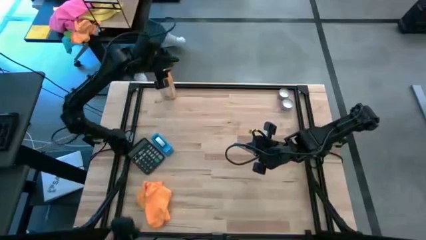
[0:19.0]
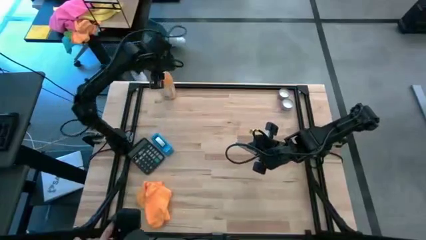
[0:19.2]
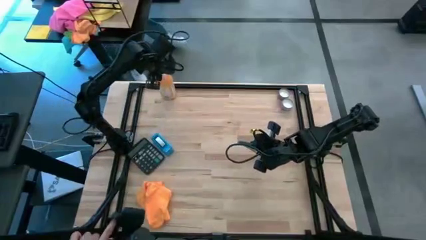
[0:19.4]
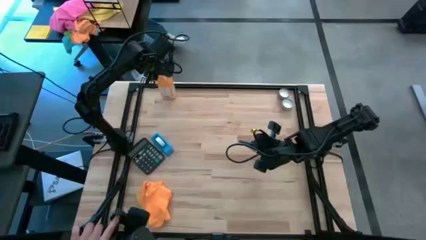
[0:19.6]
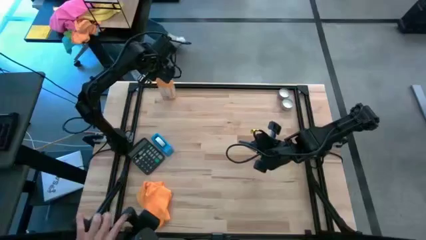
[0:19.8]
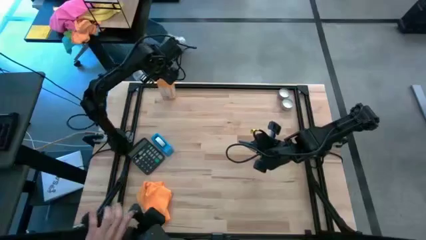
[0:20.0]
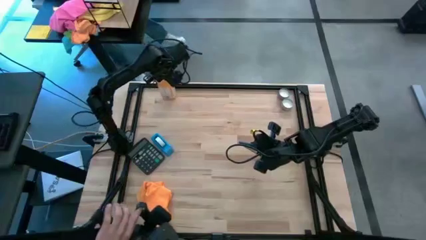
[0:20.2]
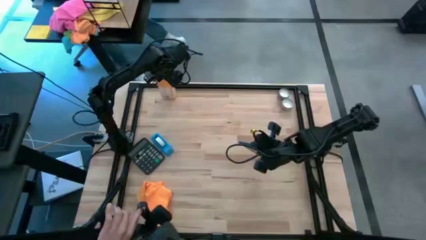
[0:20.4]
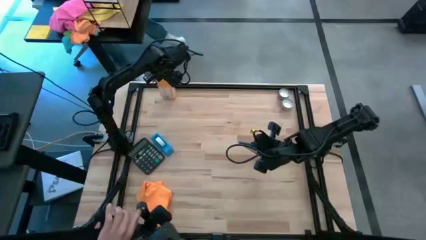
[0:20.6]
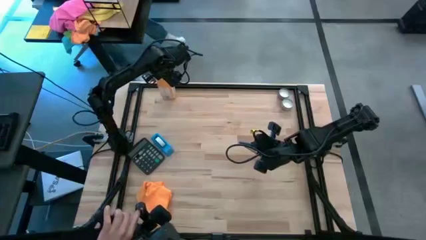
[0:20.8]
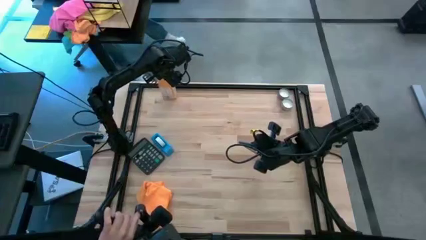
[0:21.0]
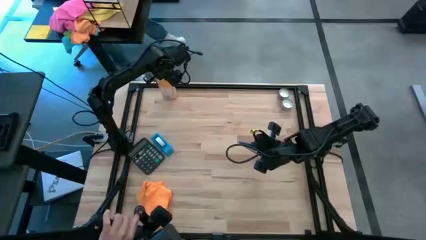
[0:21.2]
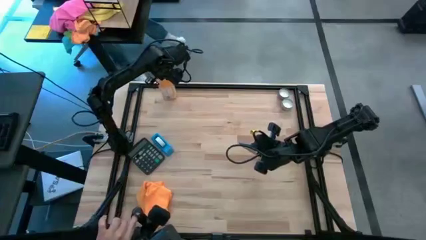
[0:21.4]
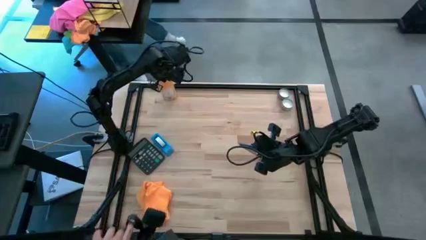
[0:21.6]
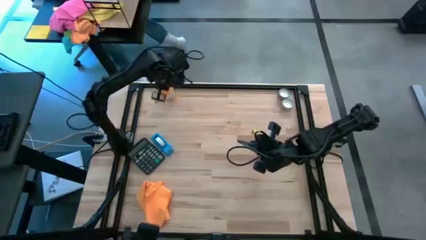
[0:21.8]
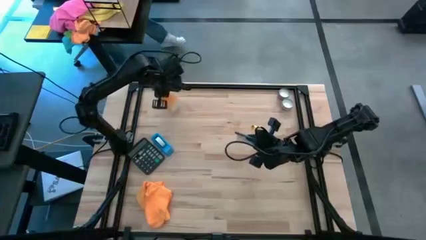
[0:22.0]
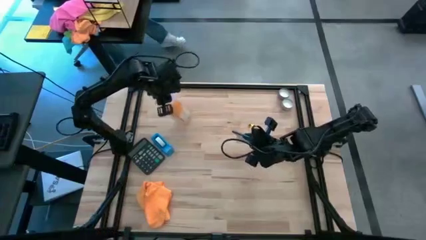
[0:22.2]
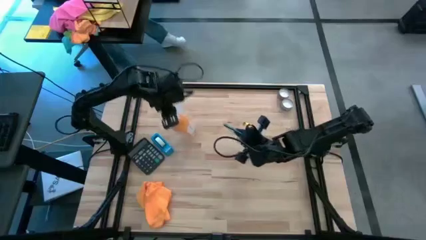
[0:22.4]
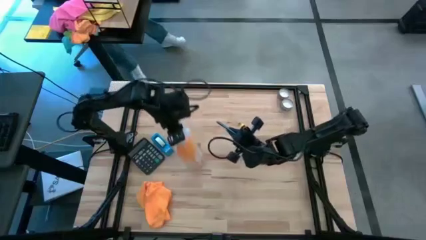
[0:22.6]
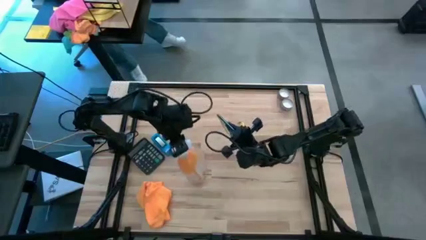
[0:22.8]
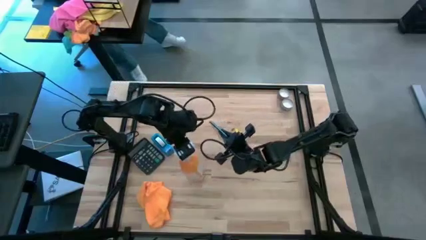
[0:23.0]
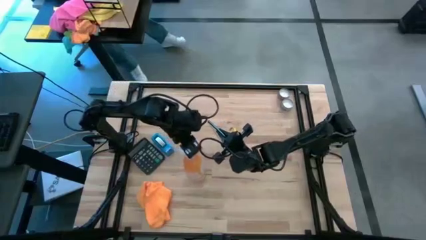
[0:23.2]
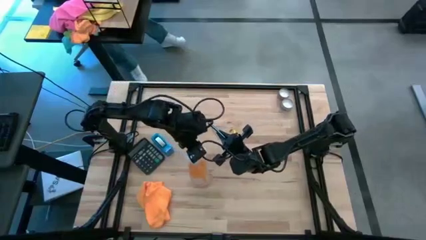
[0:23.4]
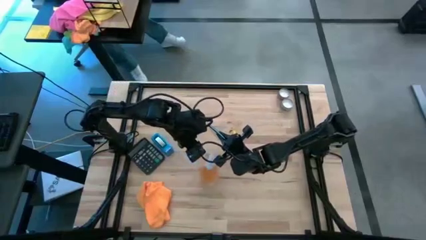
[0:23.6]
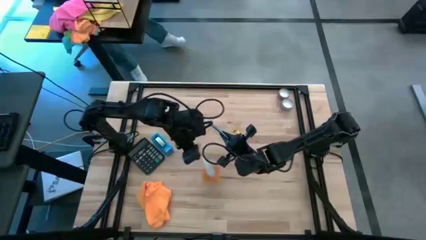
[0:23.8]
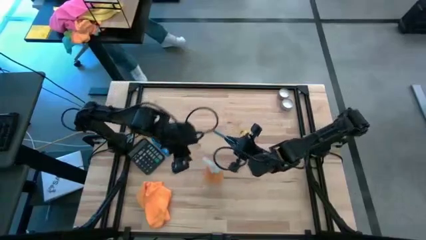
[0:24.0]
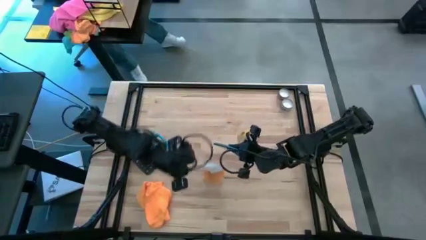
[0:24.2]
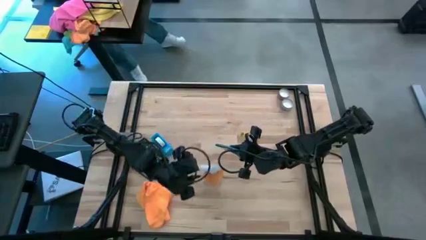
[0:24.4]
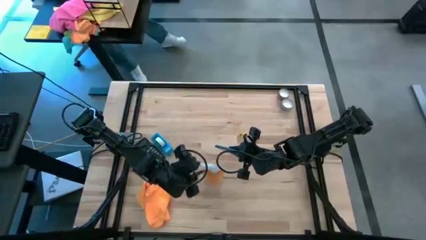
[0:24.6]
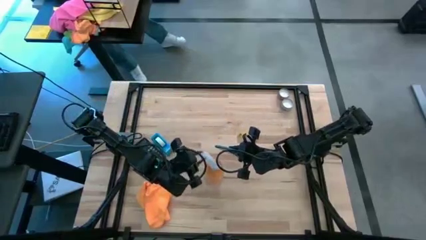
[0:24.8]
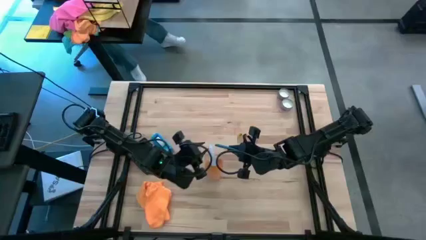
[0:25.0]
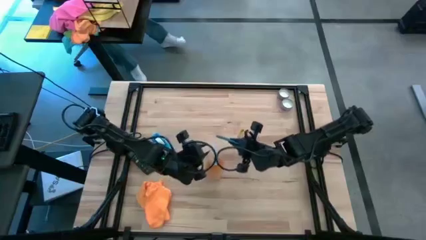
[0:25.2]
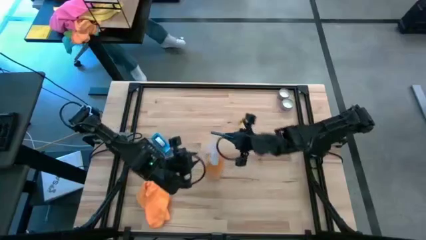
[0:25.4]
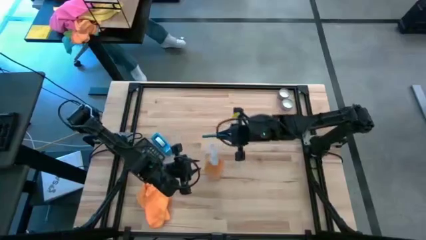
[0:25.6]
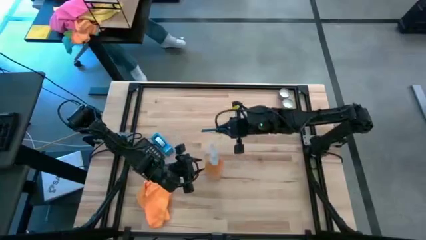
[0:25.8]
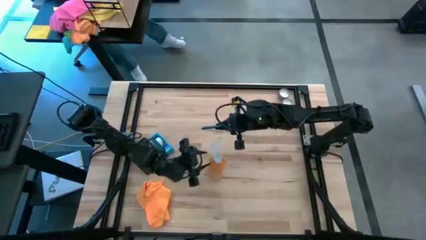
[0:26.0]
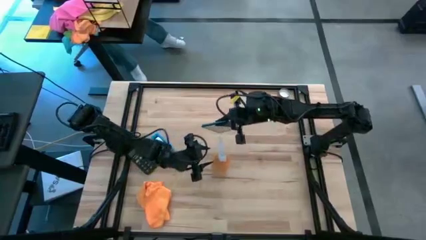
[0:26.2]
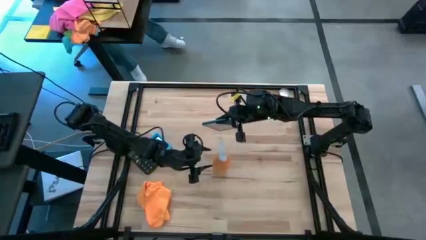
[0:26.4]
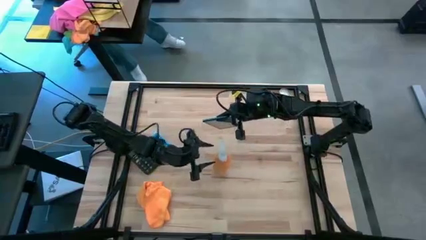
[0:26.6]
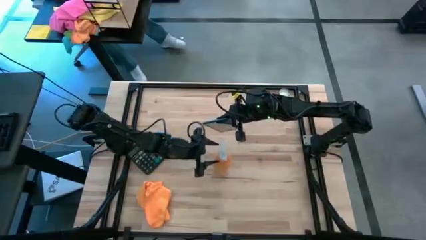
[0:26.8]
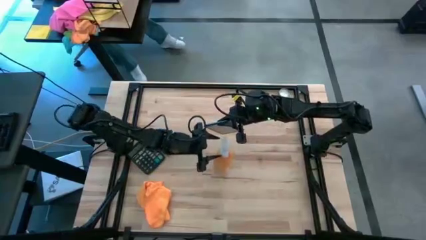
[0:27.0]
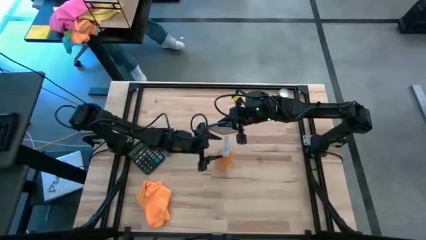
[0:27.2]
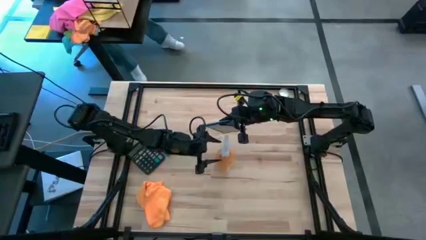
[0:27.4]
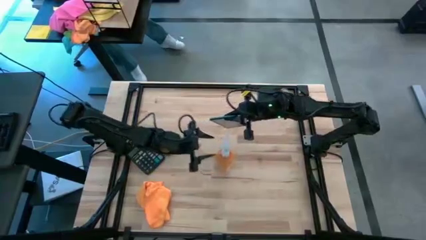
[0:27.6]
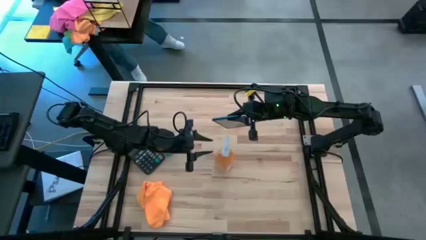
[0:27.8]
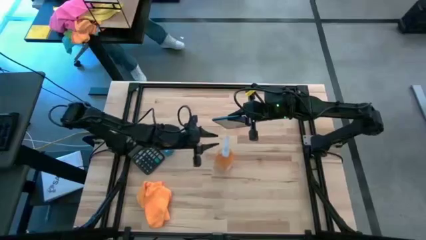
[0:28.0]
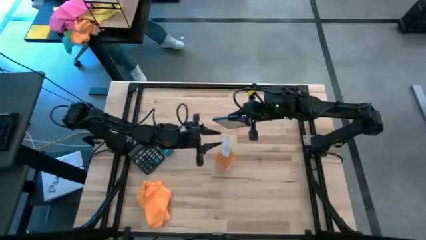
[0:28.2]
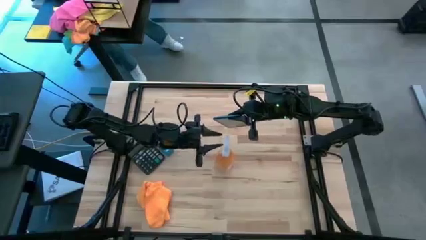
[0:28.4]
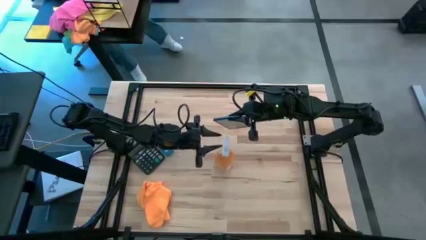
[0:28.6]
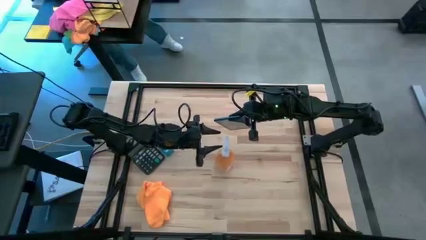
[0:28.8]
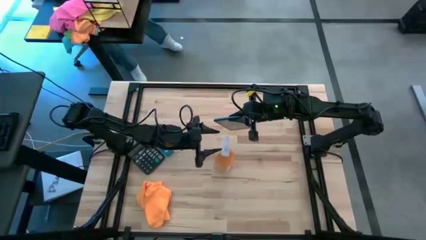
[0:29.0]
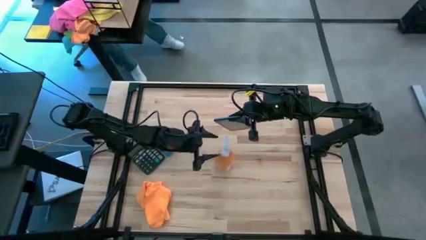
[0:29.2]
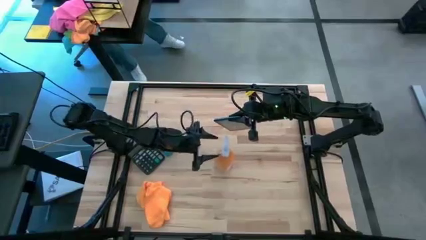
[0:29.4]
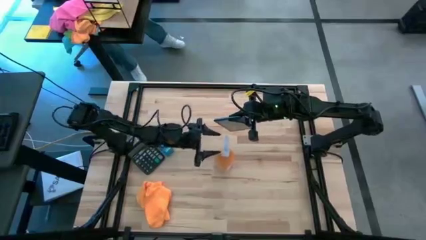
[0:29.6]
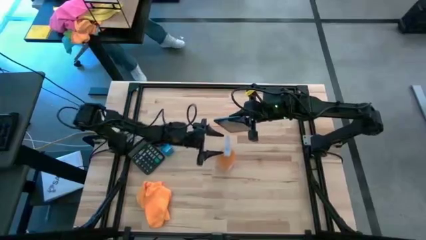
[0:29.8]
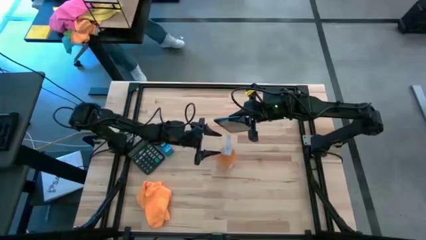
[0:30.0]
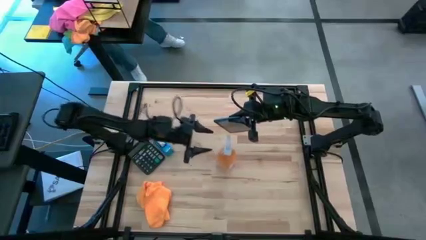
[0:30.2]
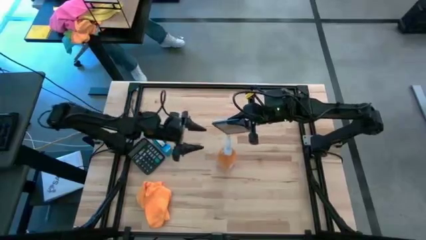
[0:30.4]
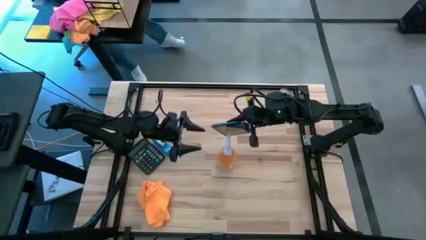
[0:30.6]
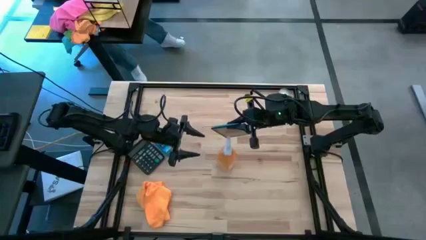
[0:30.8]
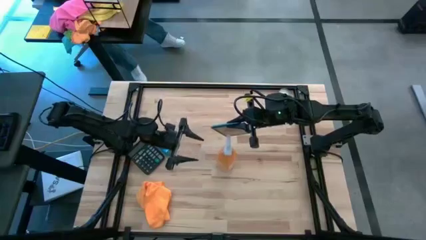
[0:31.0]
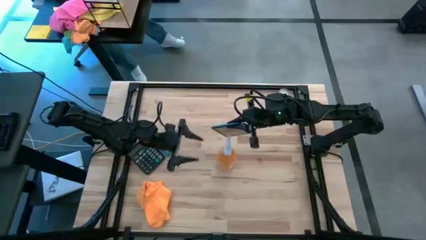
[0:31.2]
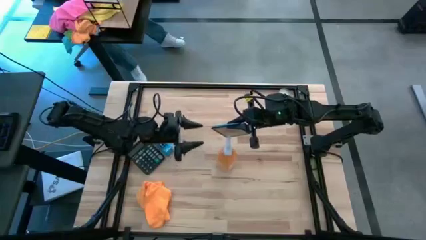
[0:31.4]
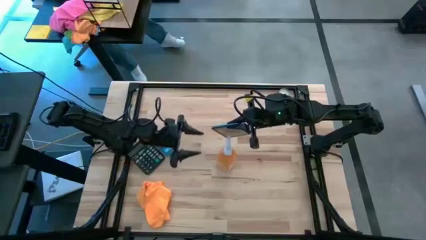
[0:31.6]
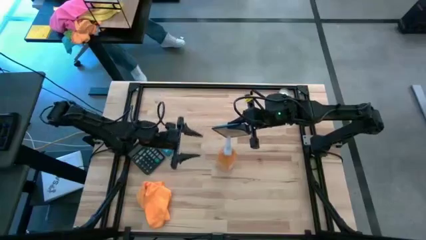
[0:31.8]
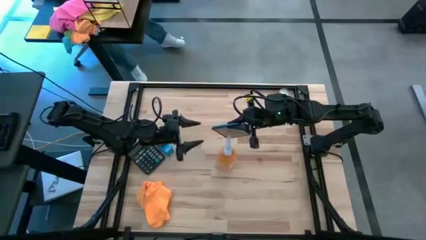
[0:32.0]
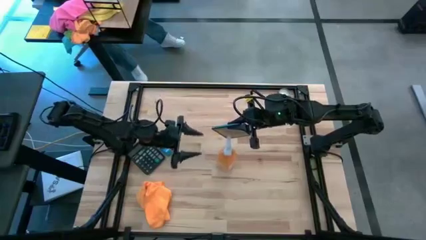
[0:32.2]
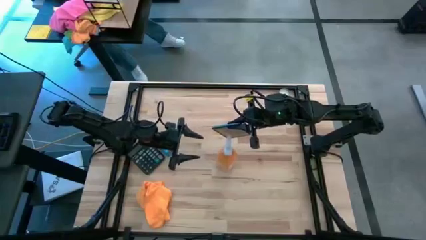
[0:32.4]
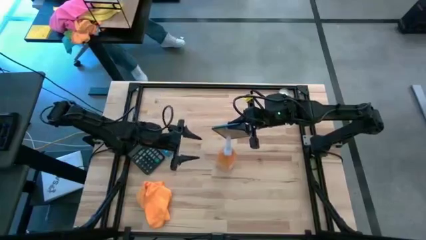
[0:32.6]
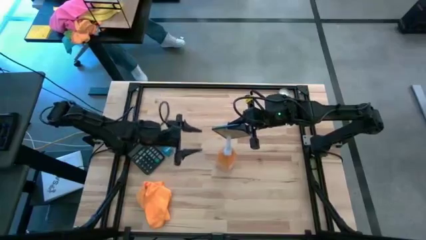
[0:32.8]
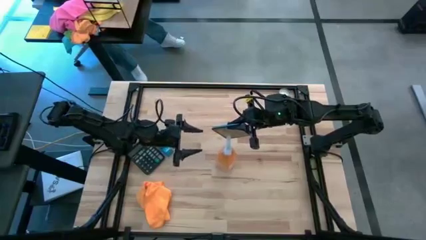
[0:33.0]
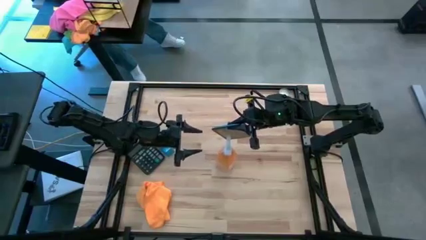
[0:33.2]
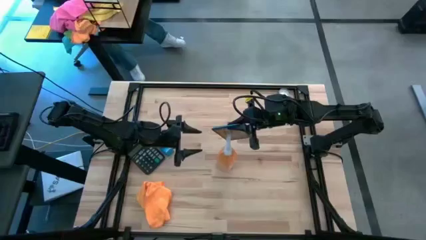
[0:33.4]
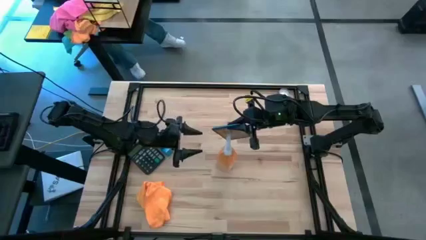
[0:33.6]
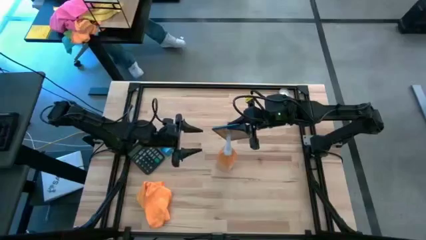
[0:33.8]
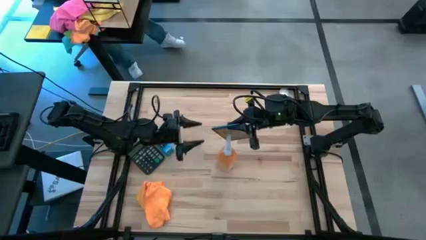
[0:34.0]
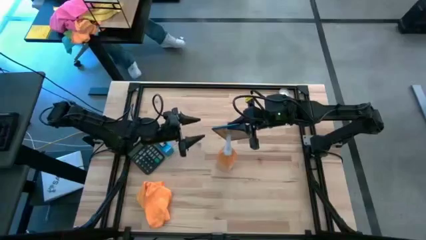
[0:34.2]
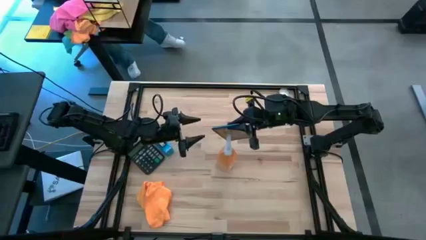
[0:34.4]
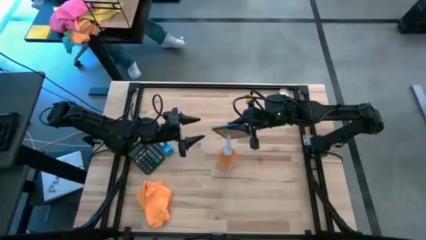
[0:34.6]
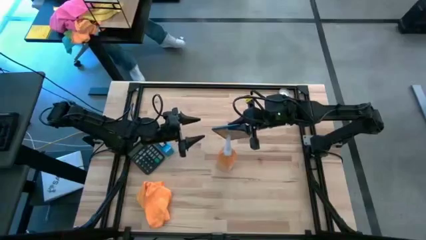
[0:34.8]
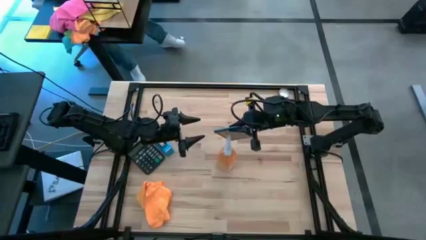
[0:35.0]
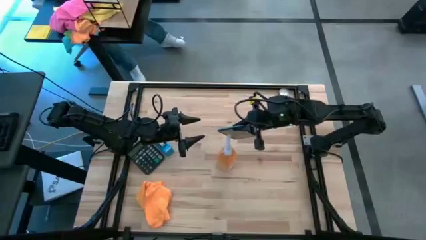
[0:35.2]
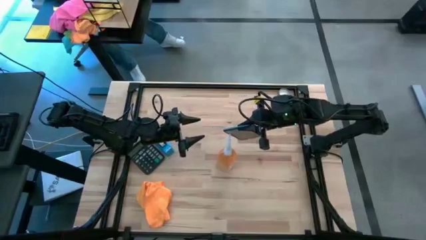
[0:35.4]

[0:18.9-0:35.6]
Task: Apply microfiber cloth
Spray the blue phone using the orange spray bottle
